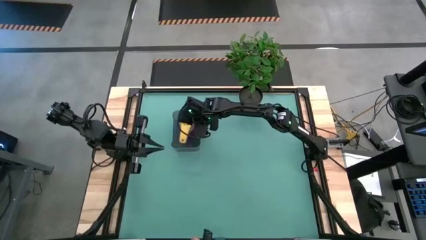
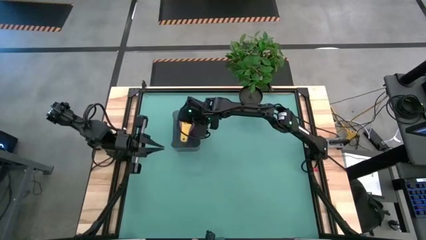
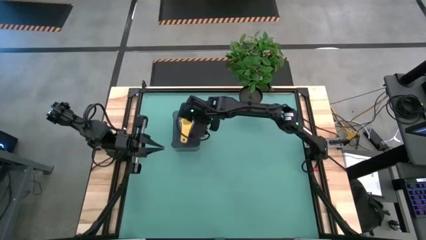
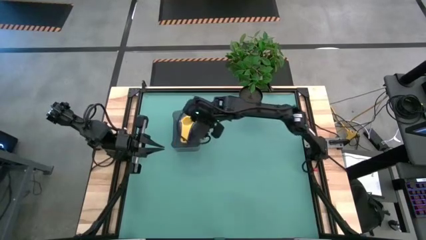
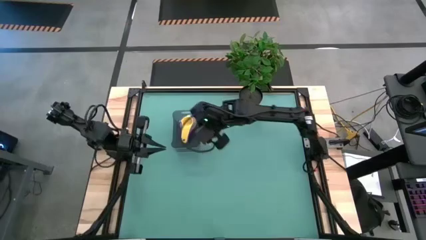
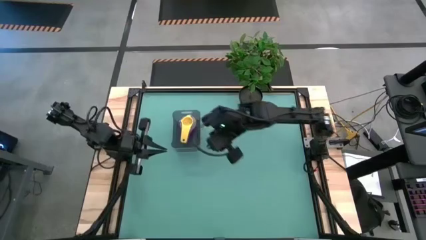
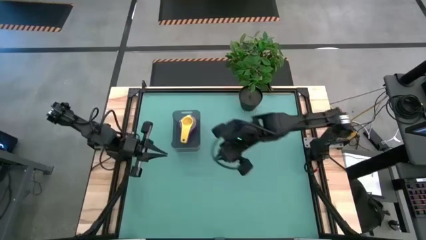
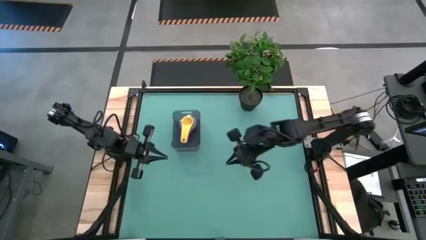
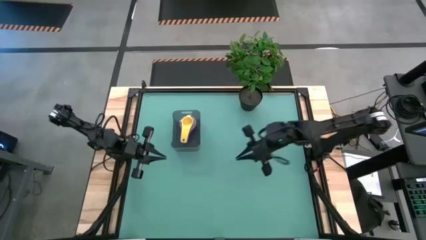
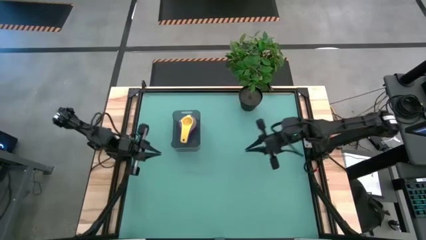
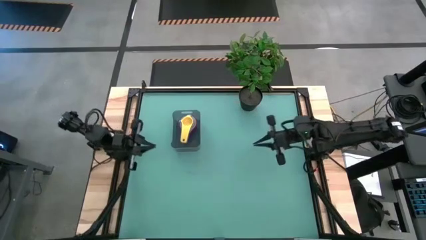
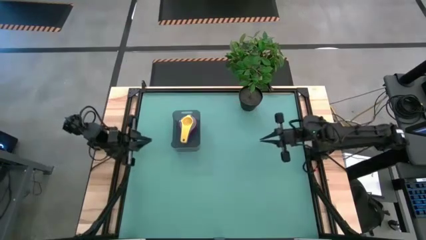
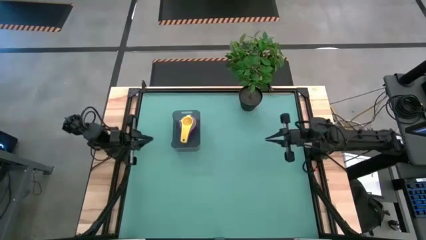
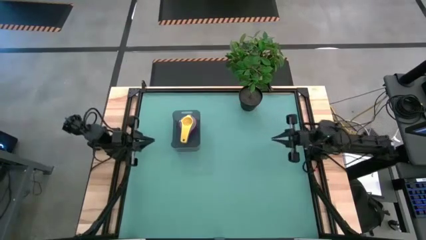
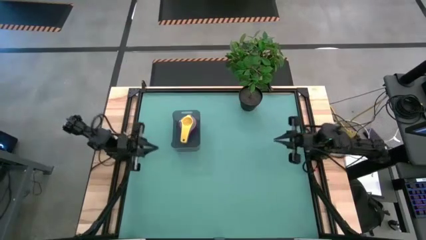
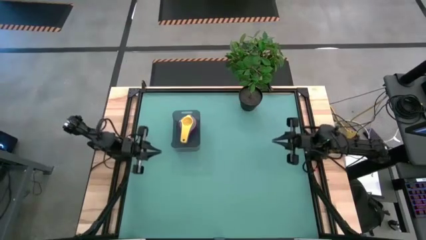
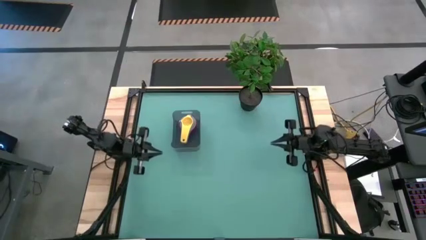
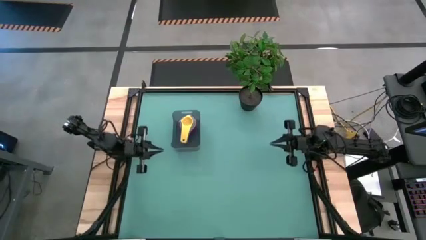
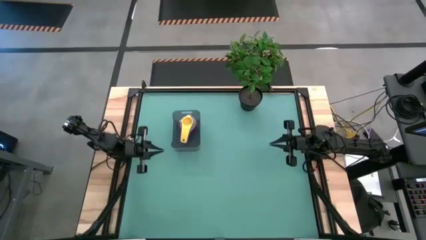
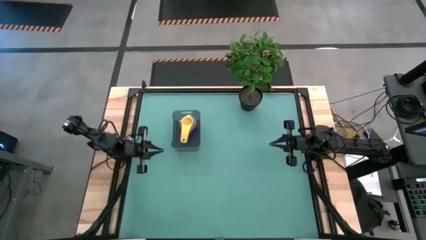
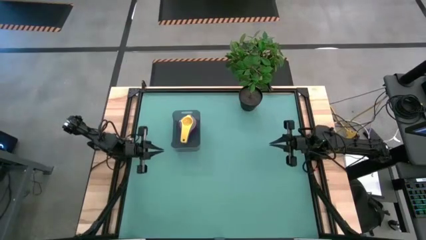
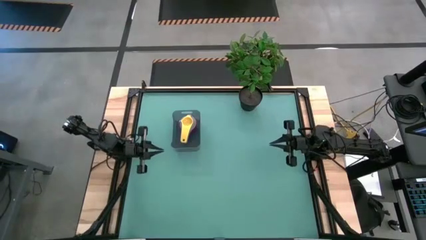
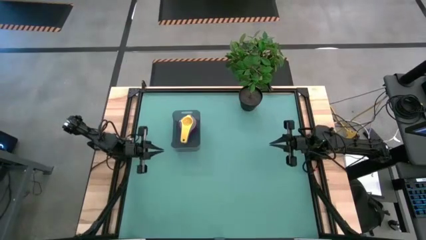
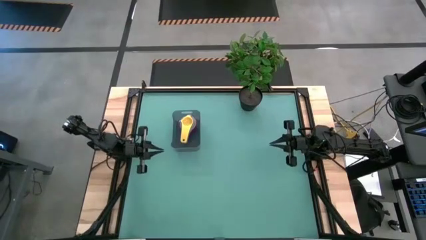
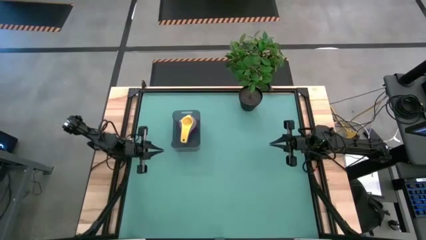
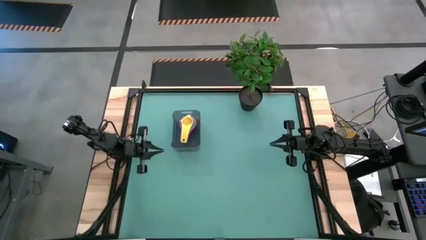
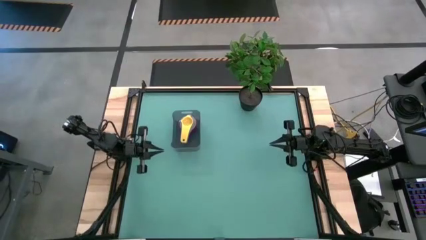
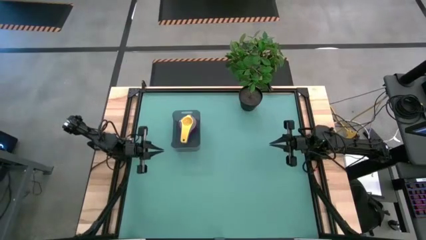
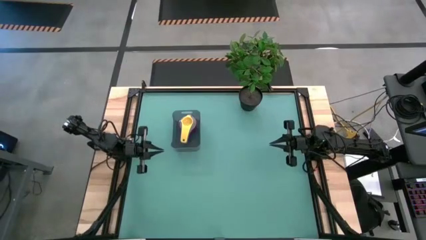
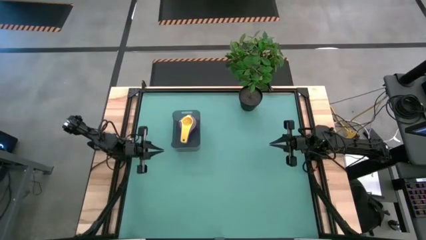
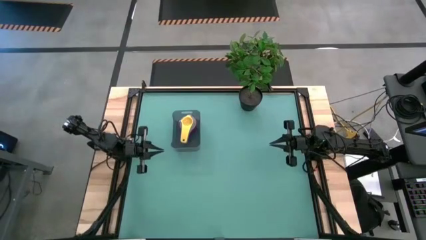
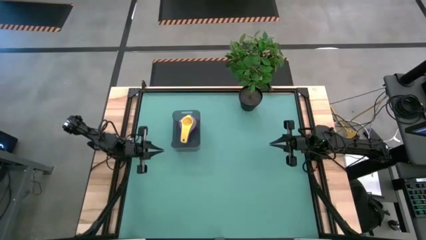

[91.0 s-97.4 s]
Task: Nest measuring cups in basket
Return to Home Position

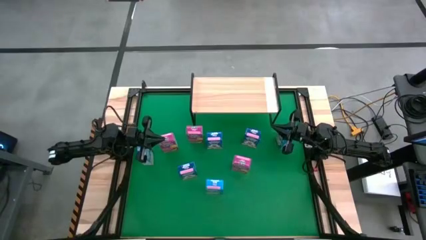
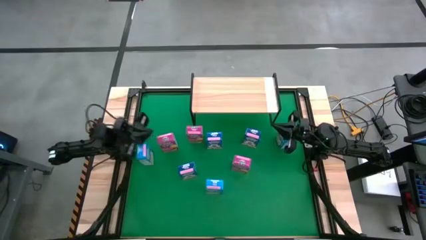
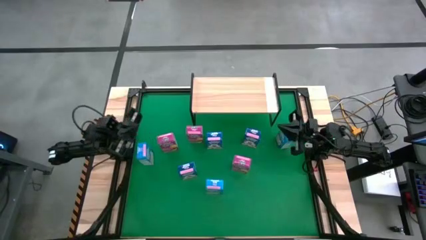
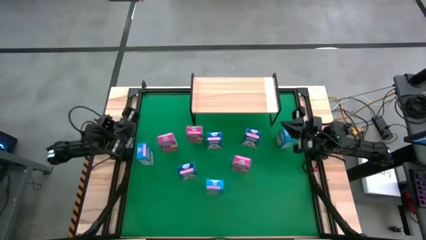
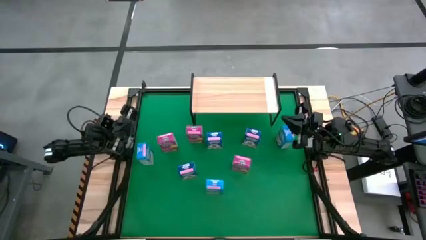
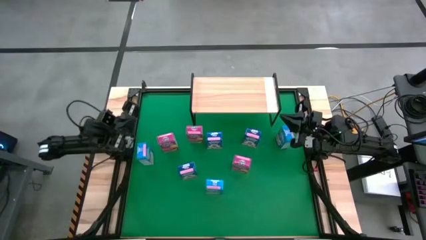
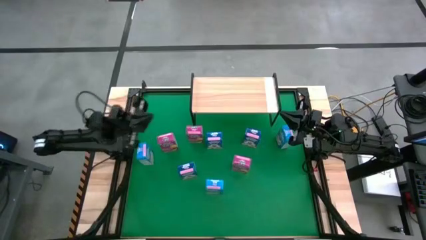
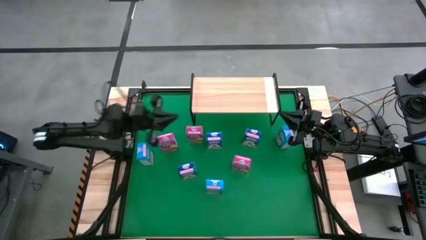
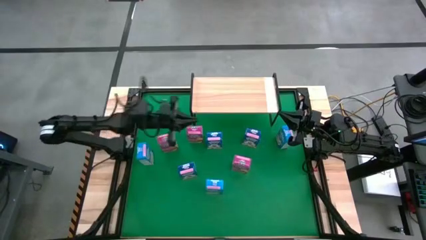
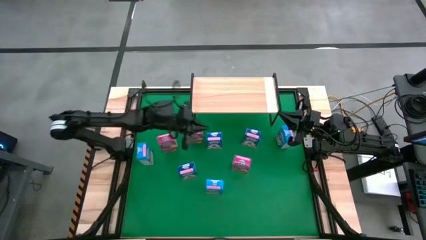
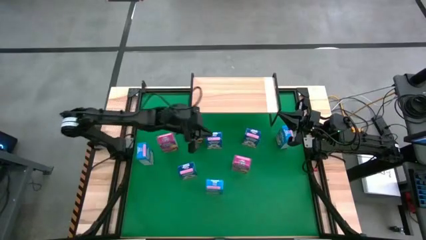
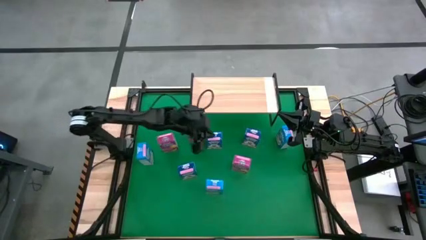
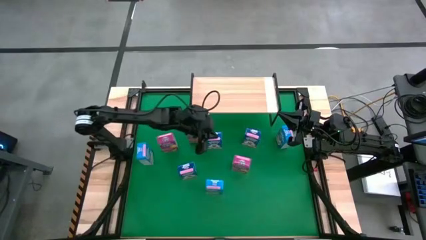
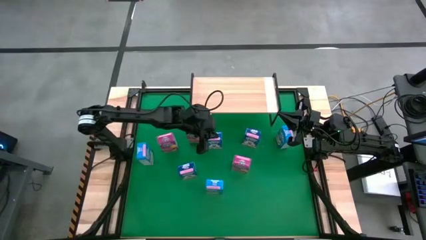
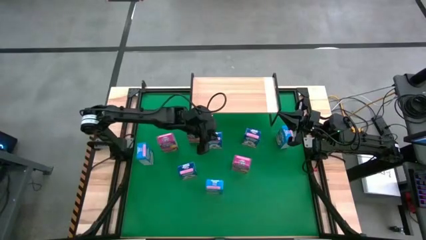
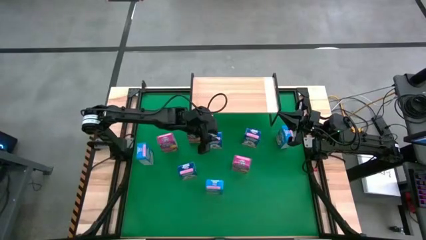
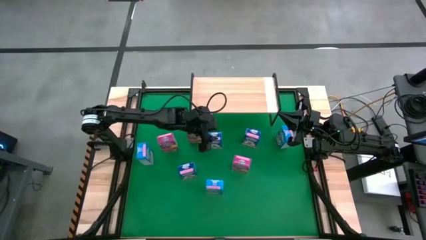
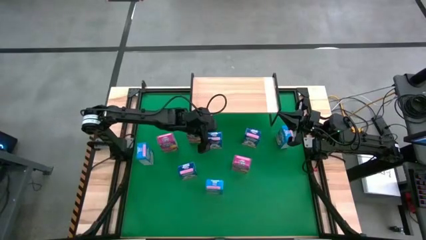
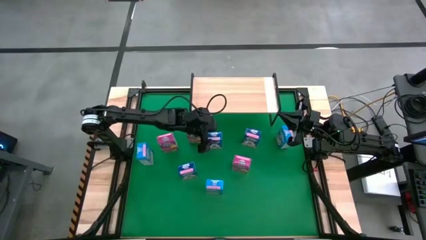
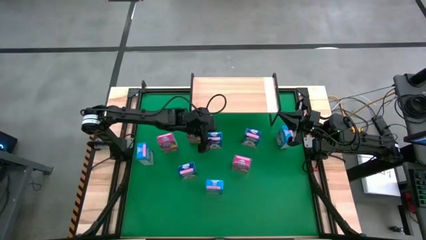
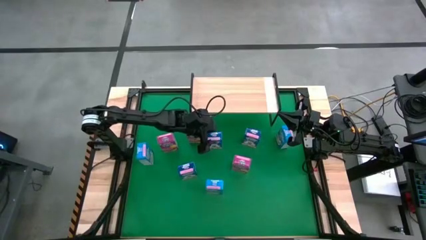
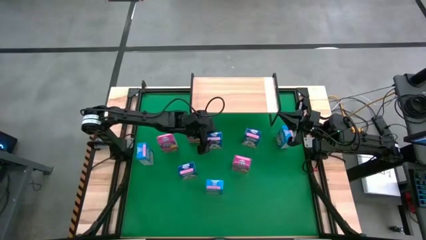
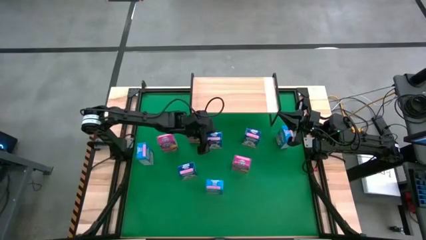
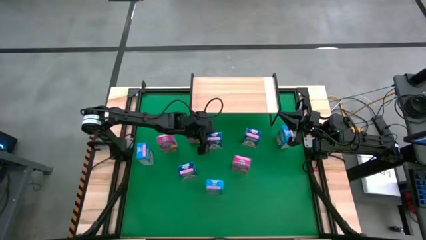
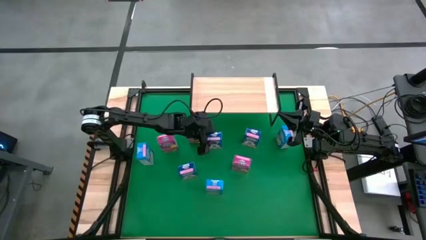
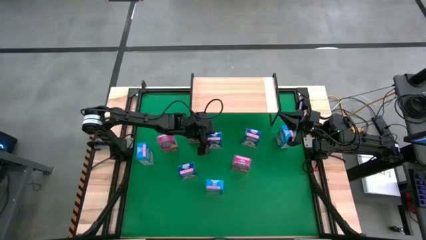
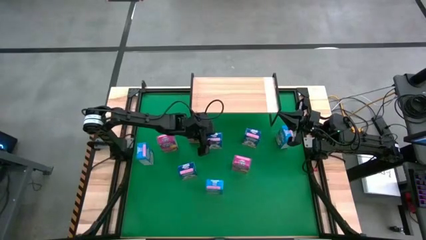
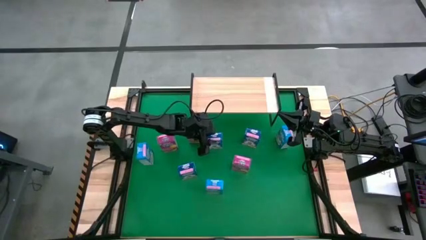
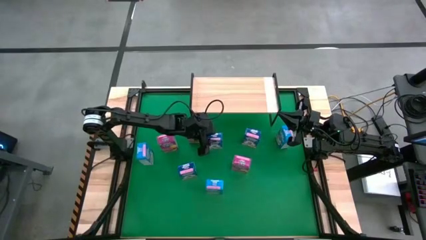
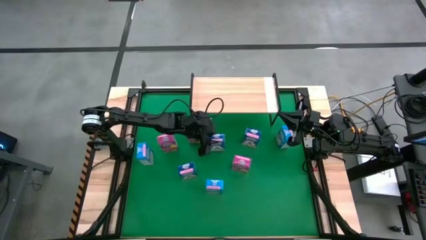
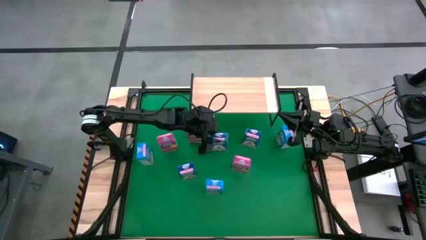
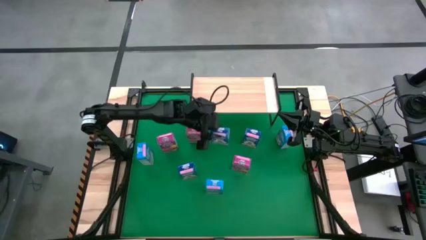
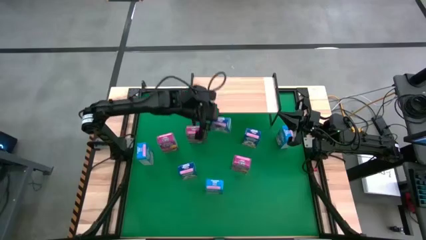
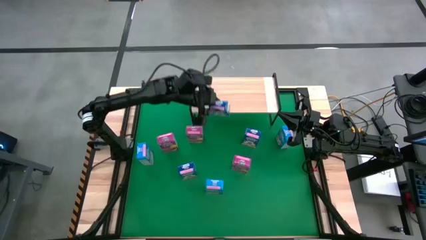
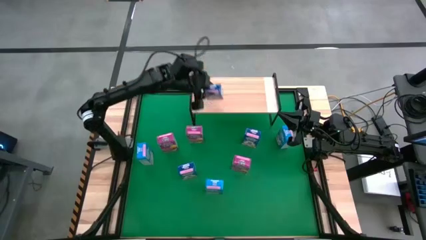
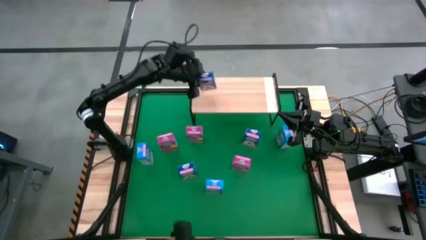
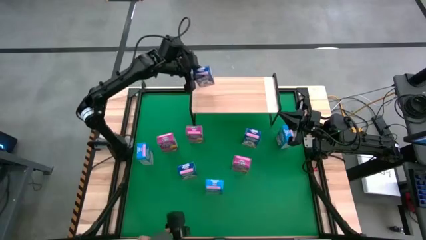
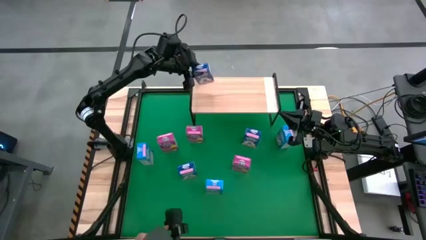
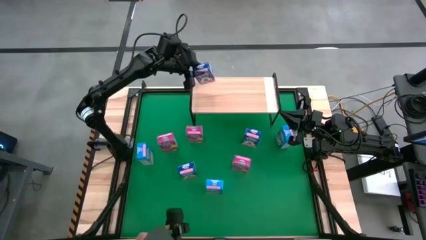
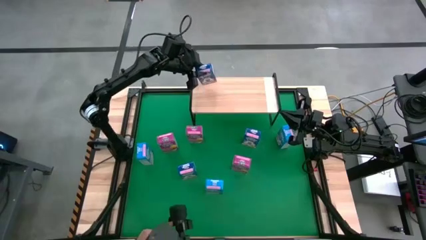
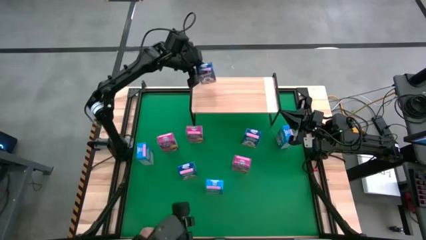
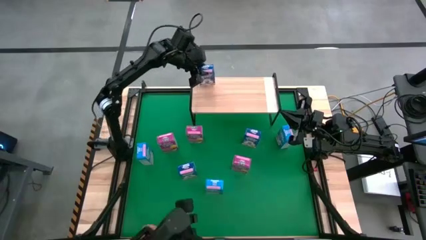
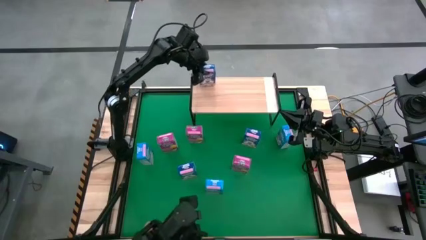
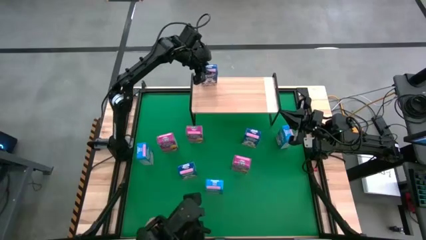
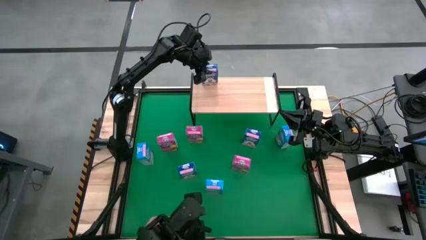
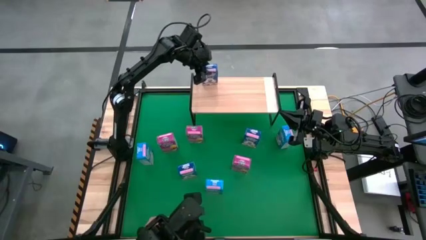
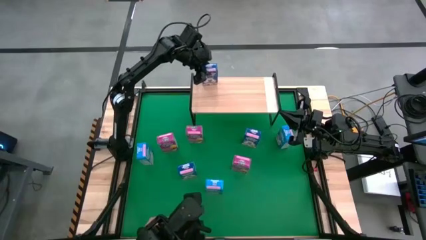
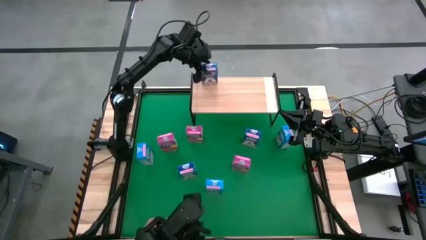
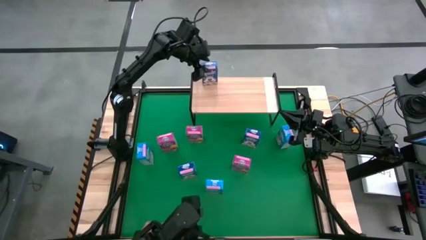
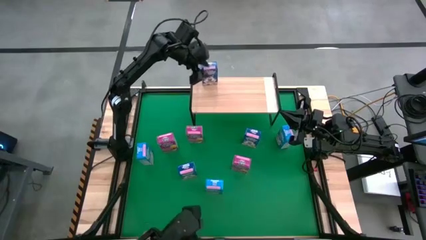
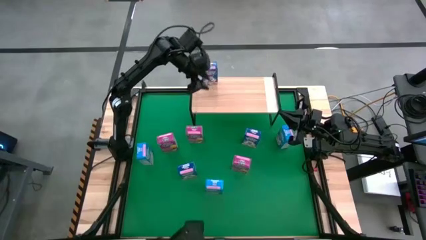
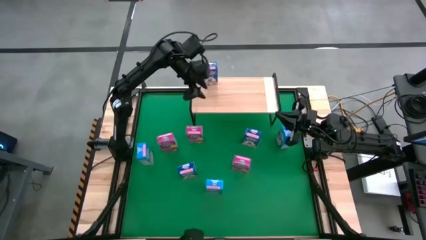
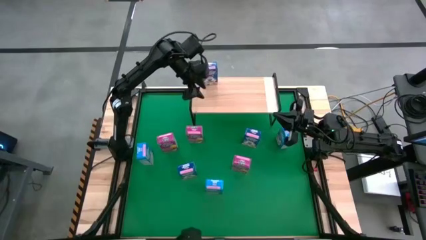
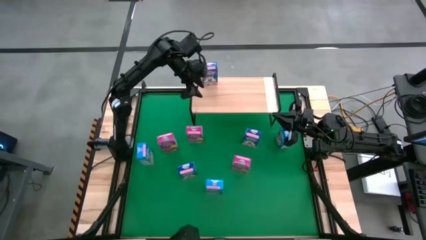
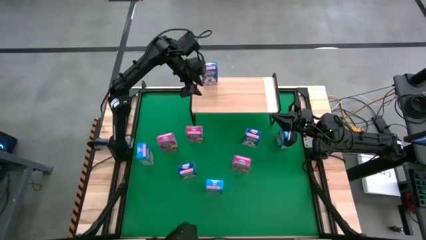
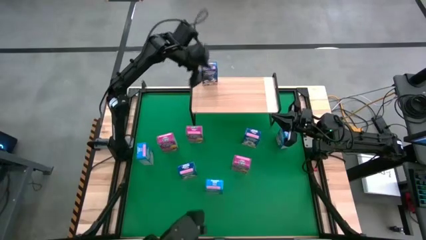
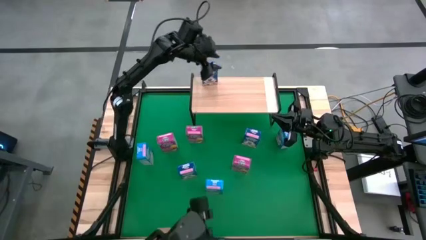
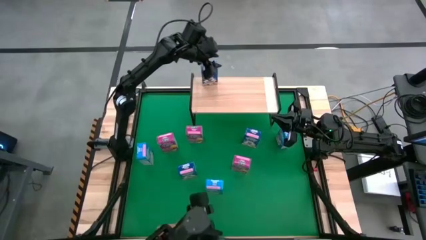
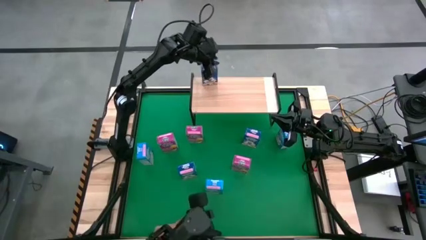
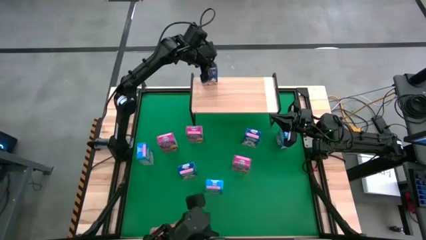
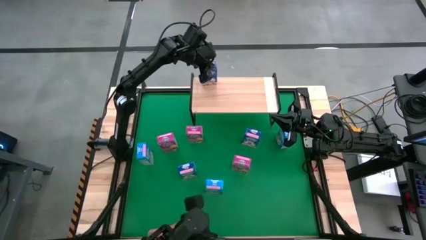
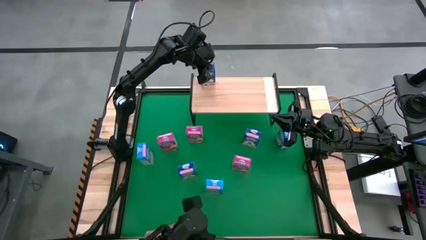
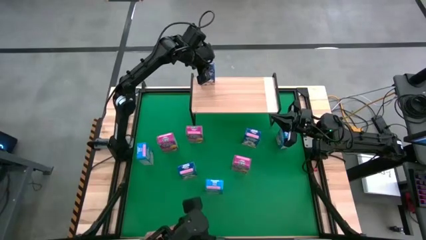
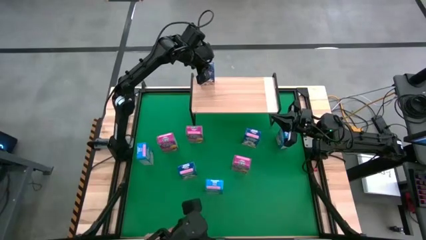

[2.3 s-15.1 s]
Task: Stack cereal on shelf
Put the middle blue cereal box on the shelf
